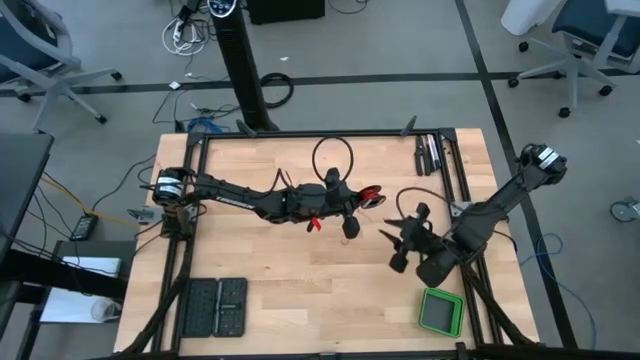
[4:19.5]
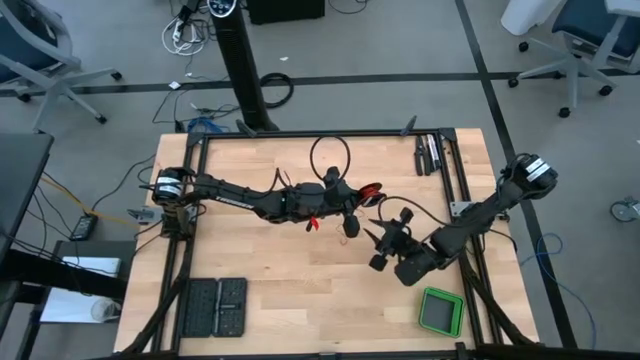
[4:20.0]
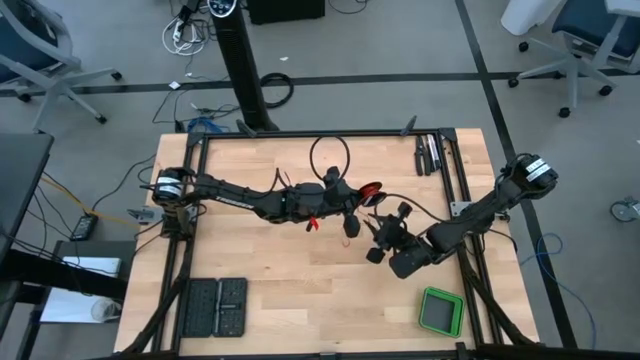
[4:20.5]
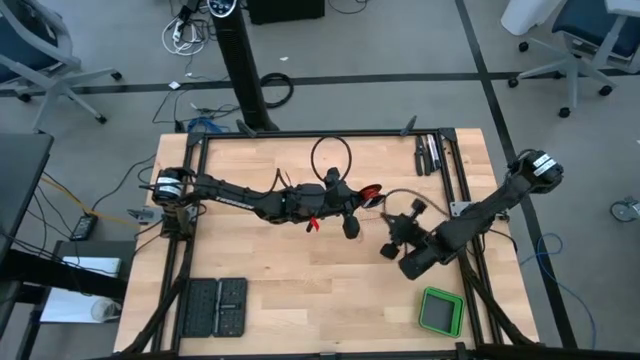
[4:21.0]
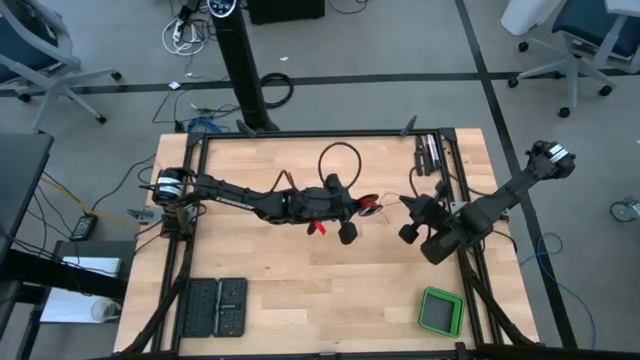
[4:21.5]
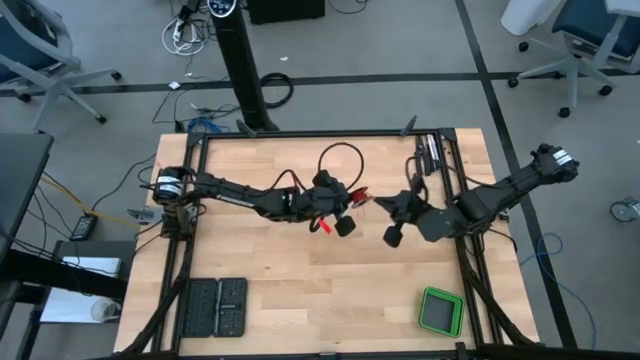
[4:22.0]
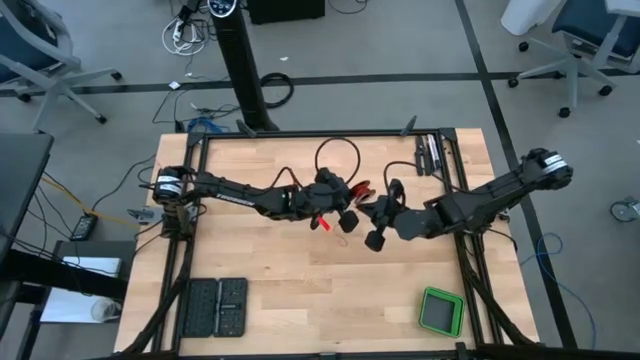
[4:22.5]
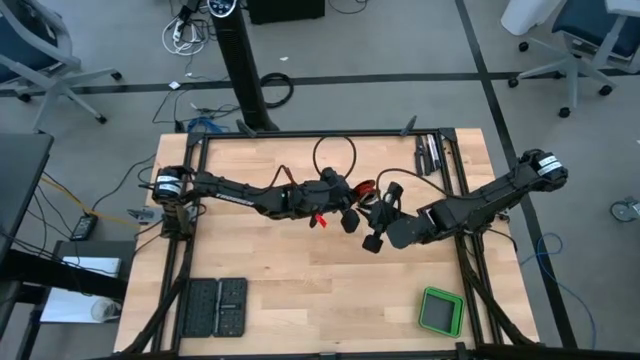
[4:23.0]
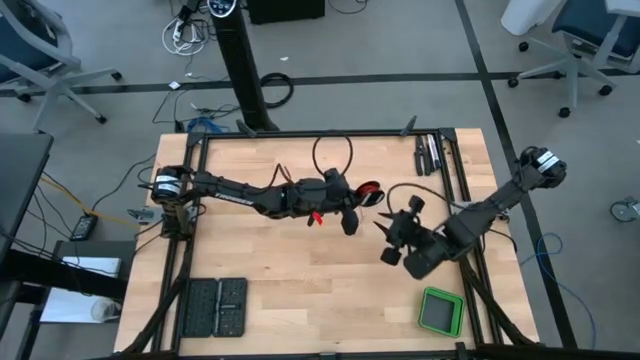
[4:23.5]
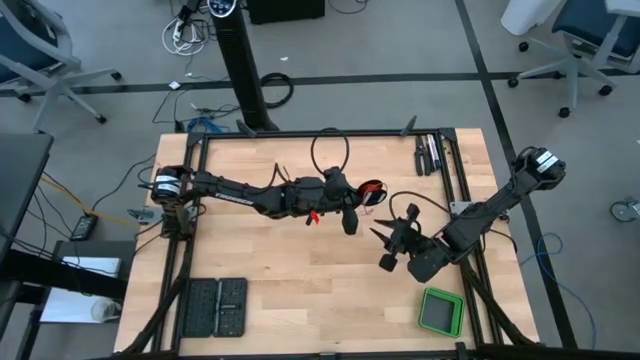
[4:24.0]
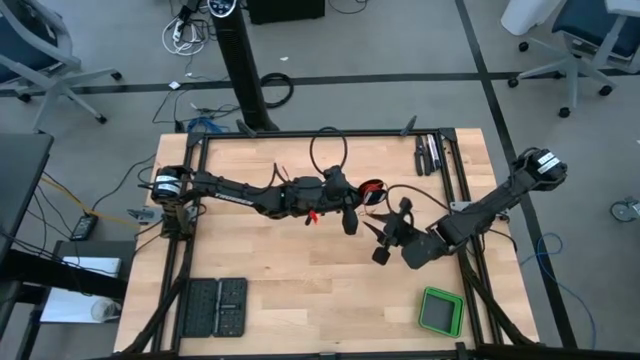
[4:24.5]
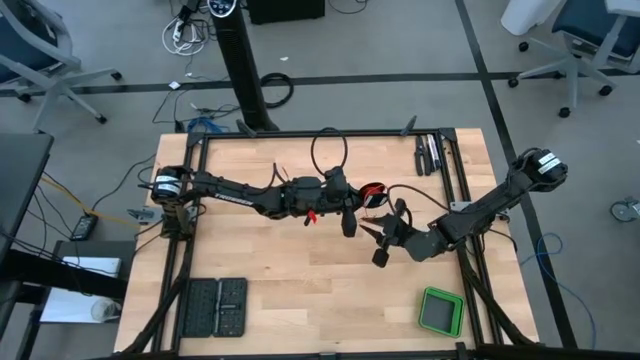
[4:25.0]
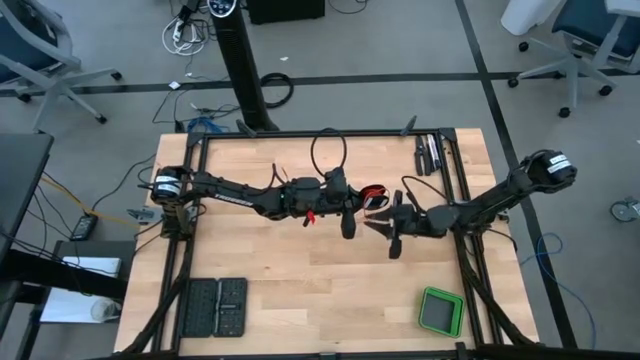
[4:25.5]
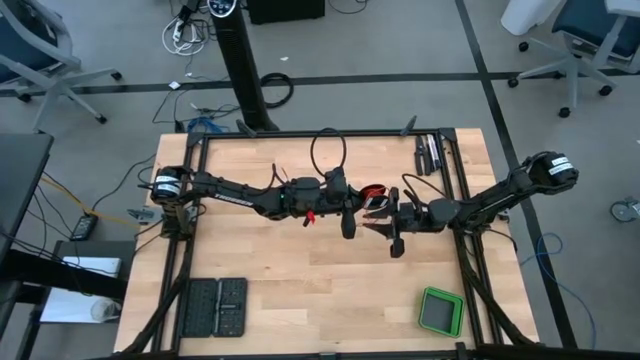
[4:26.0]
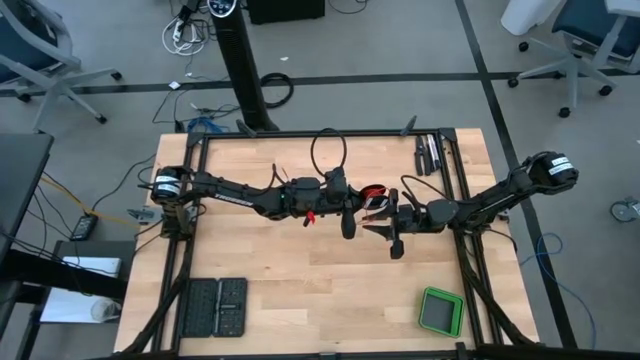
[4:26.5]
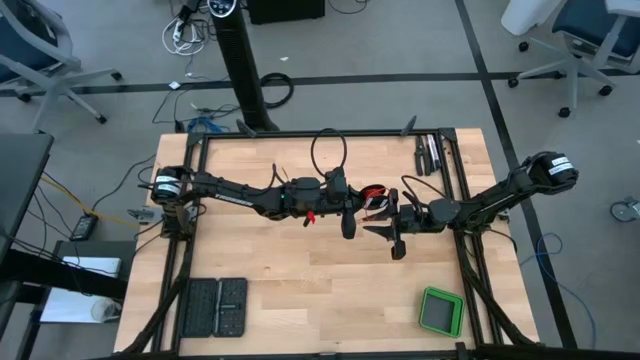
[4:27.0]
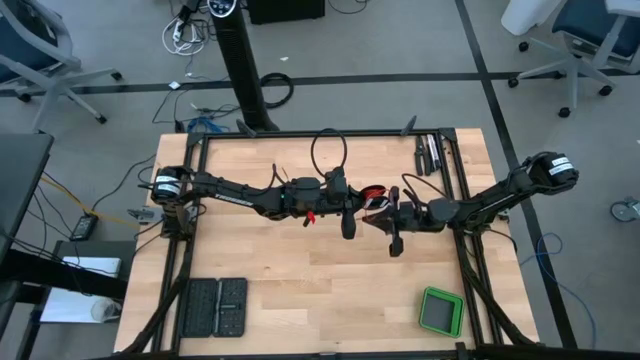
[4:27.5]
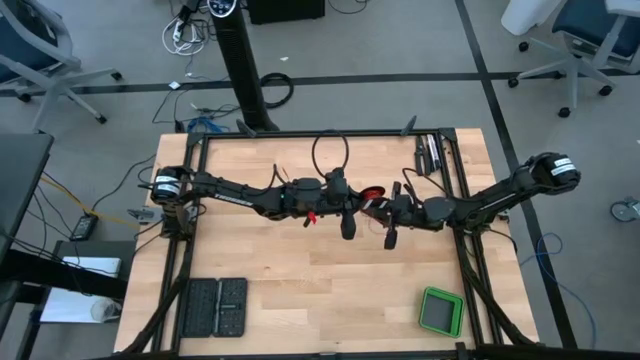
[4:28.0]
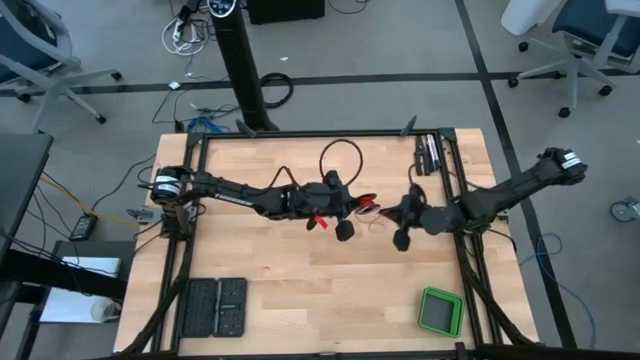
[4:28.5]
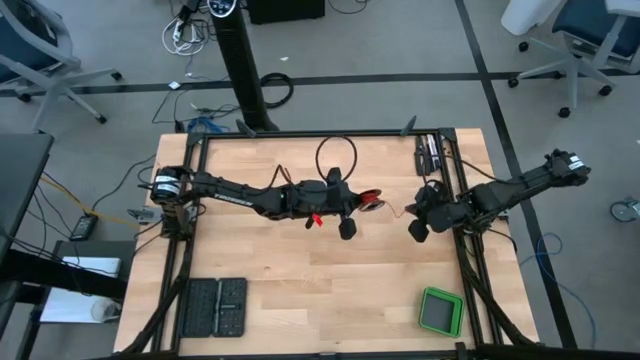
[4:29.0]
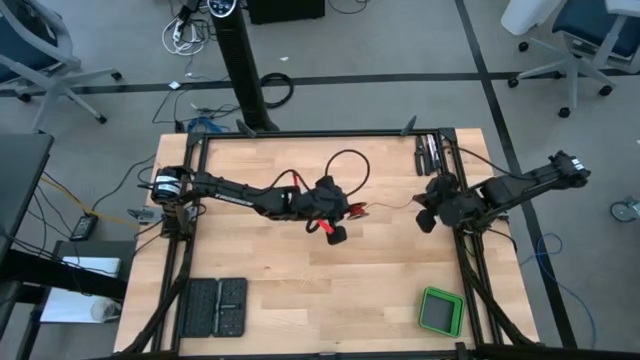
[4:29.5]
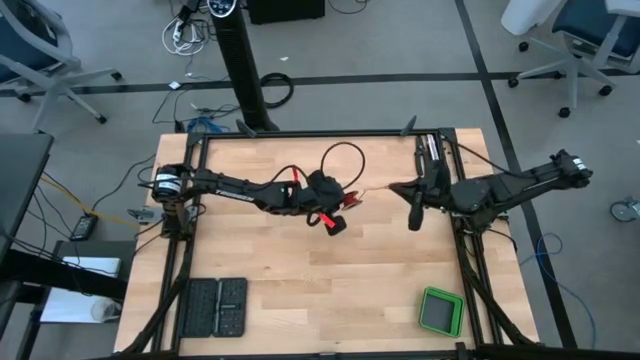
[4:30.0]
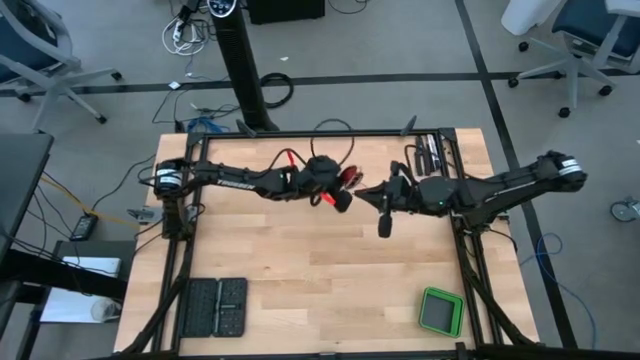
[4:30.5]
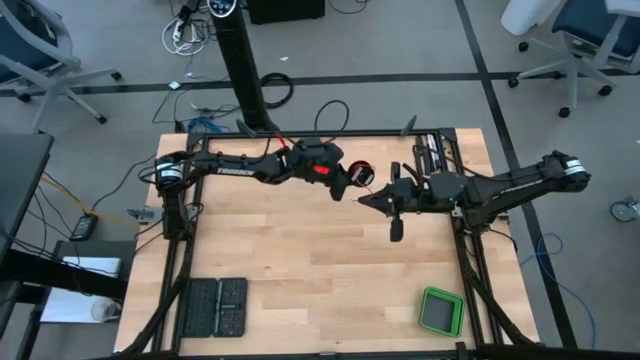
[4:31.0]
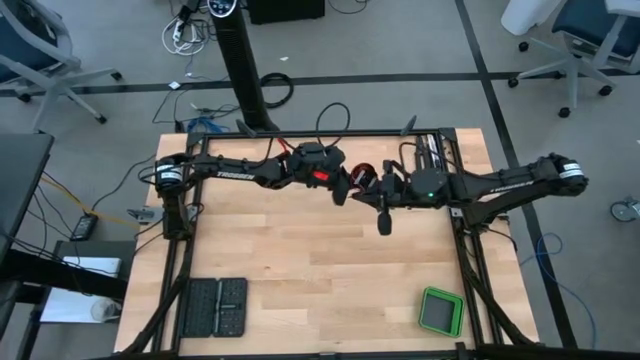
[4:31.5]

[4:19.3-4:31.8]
Task: Coil cords
Coil the wire cable onto the spool

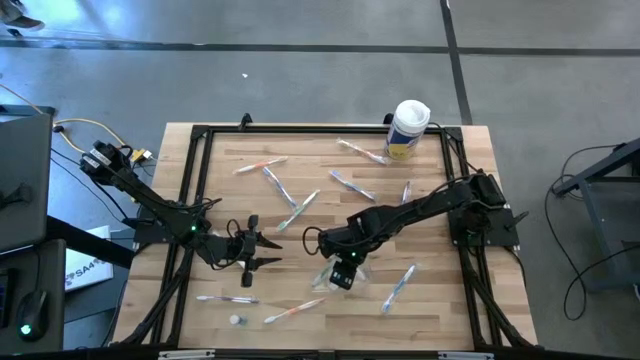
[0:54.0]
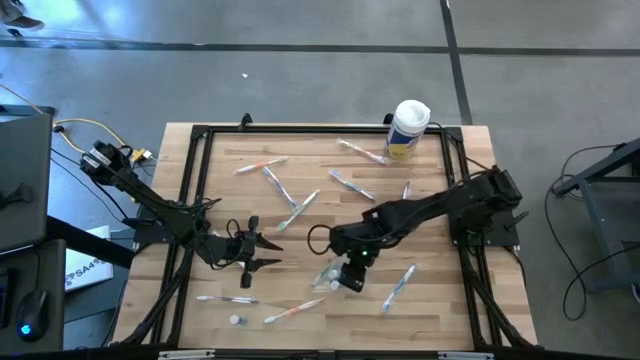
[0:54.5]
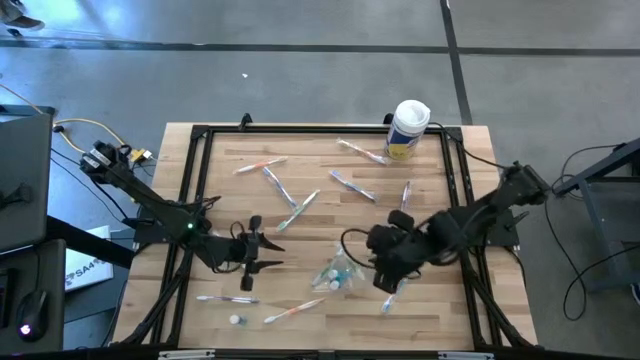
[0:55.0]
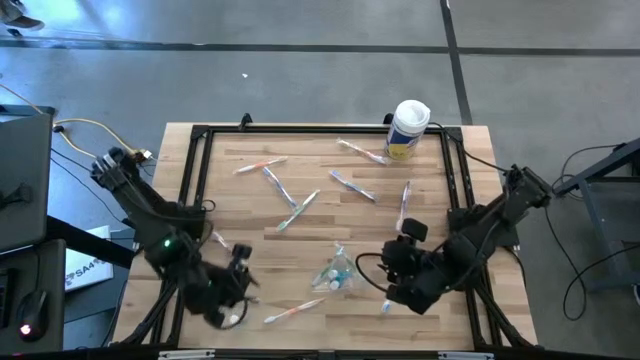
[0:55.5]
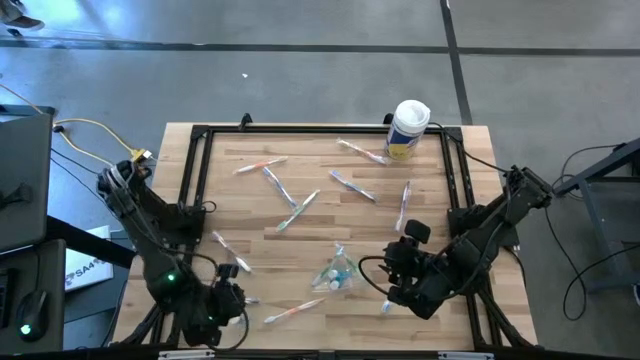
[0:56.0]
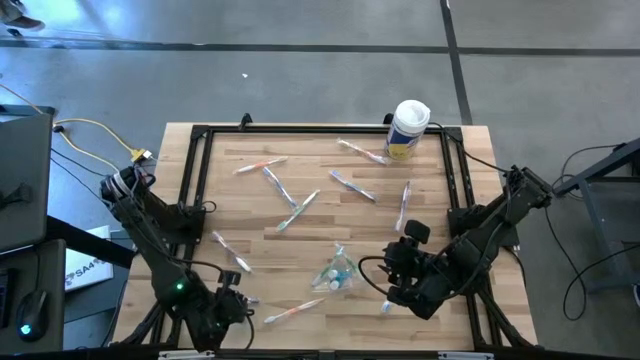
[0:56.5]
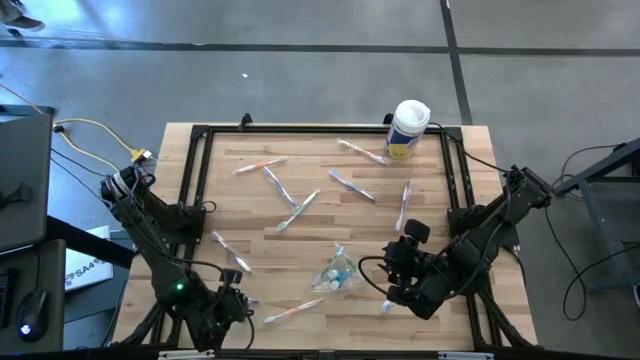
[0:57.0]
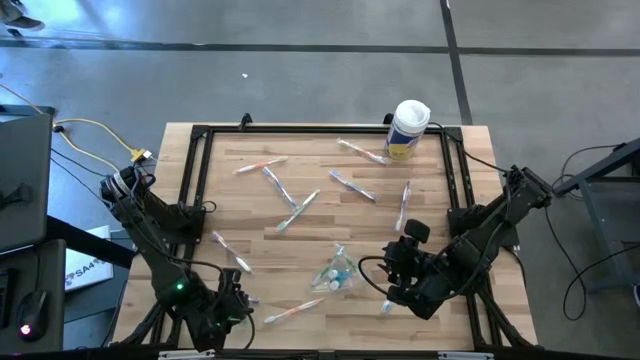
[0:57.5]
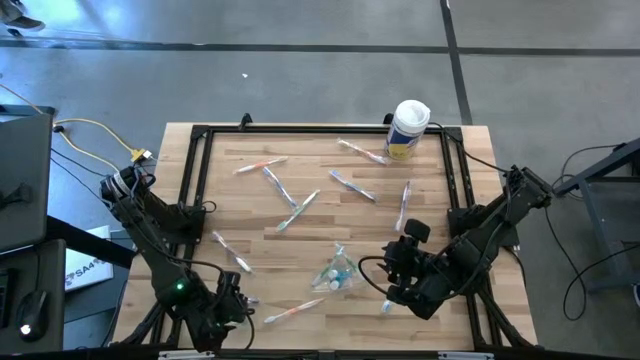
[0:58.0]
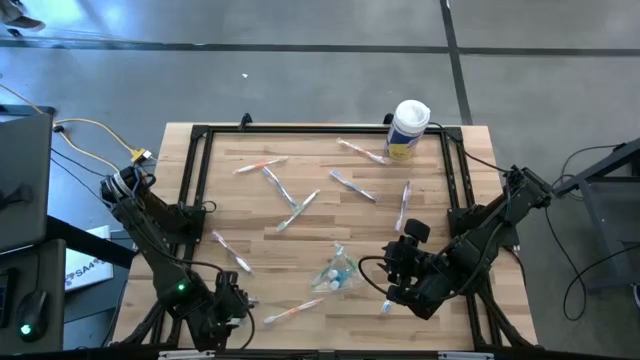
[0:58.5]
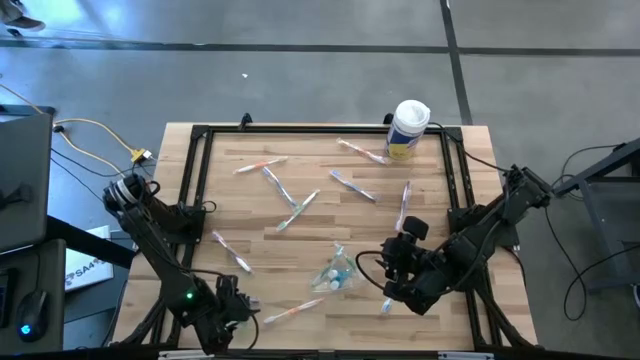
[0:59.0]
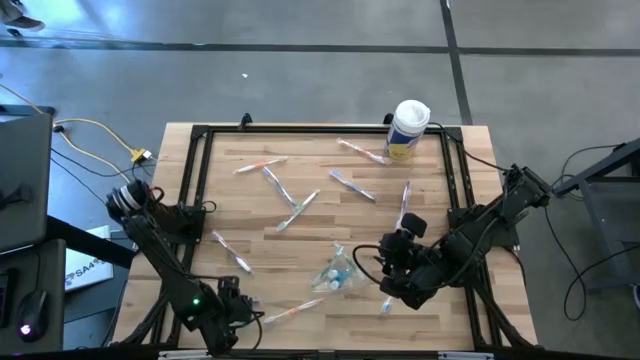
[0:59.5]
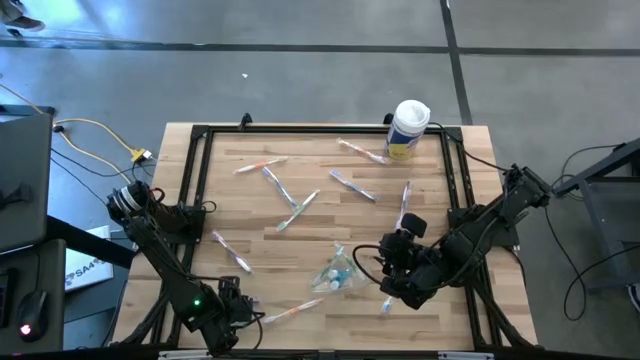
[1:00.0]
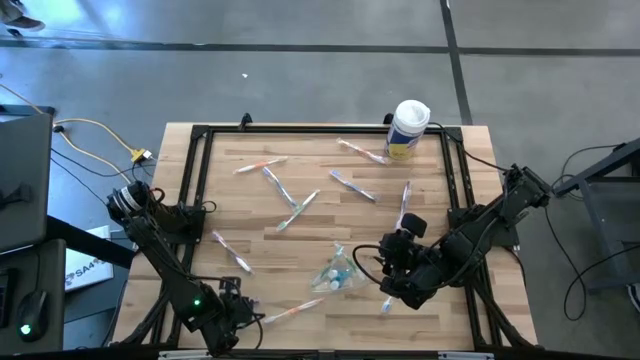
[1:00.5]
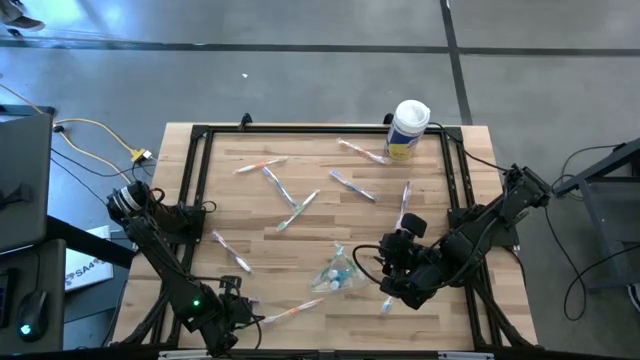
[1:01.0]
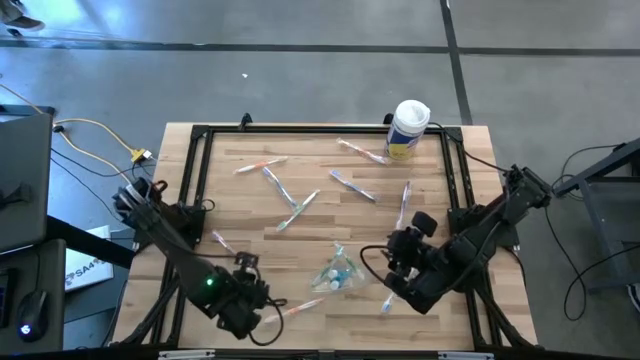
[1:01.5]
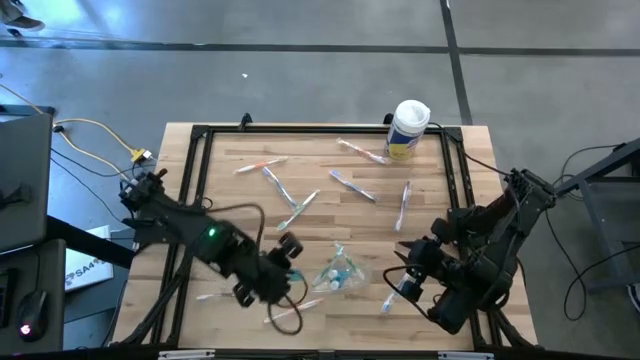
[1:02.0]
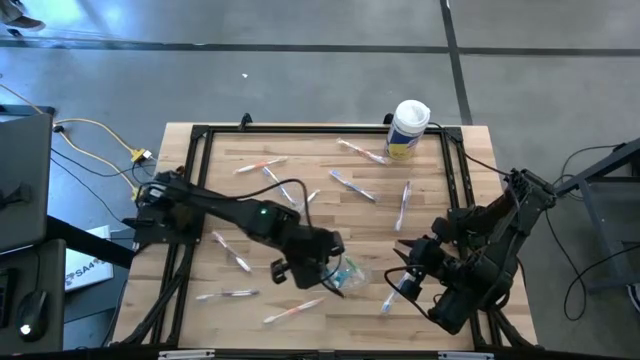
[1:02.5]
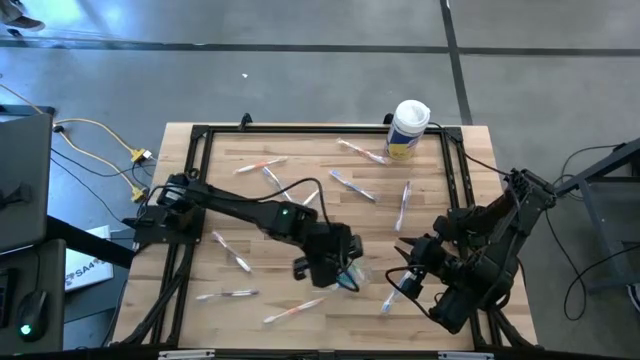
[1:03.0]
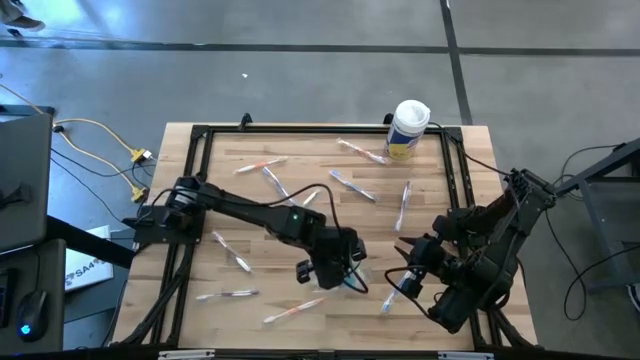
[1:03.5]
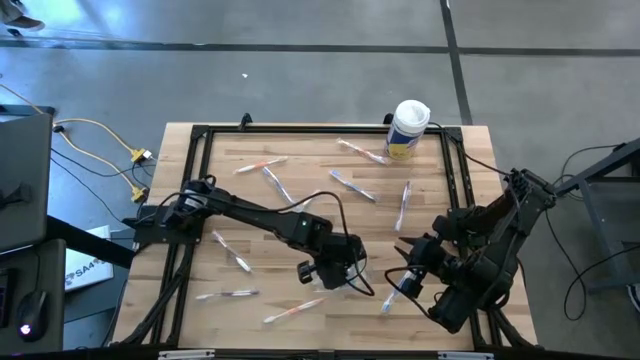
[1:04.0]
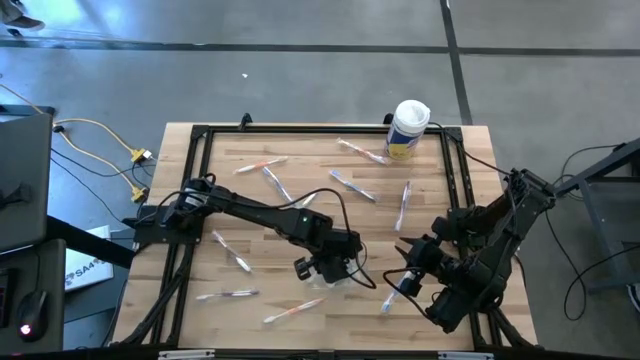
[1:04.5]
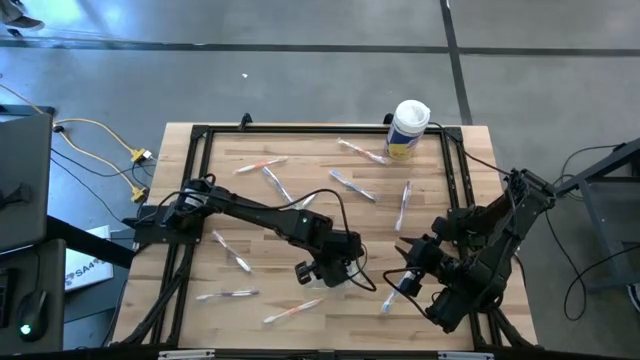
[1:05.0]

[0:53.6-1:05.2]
Task: Pick & Place toothbrushing station
Put the blue mouthwash into the transparent organizer
